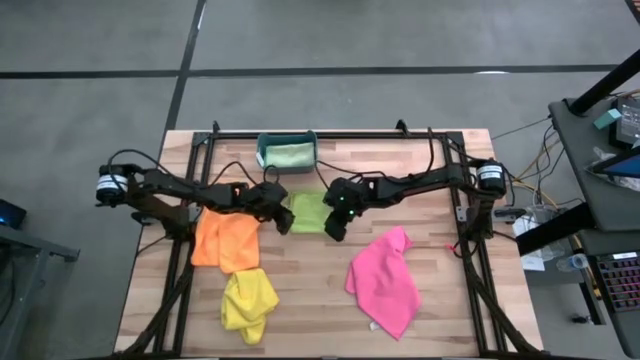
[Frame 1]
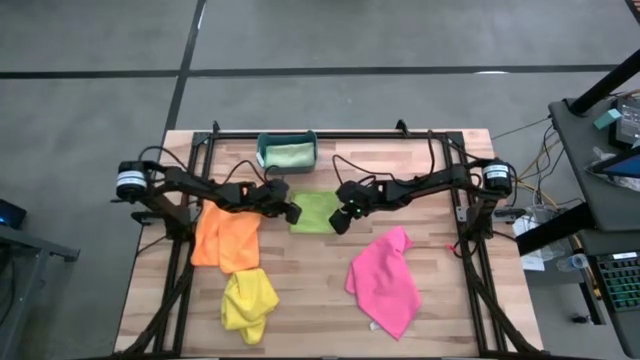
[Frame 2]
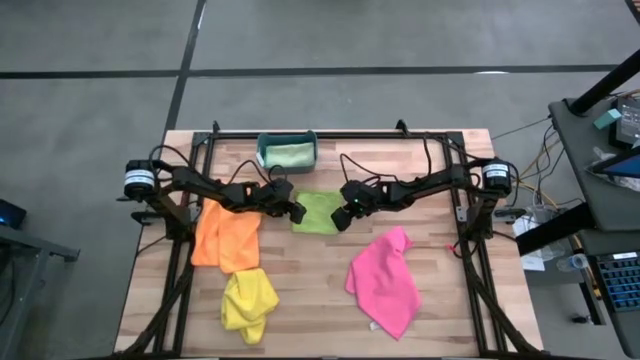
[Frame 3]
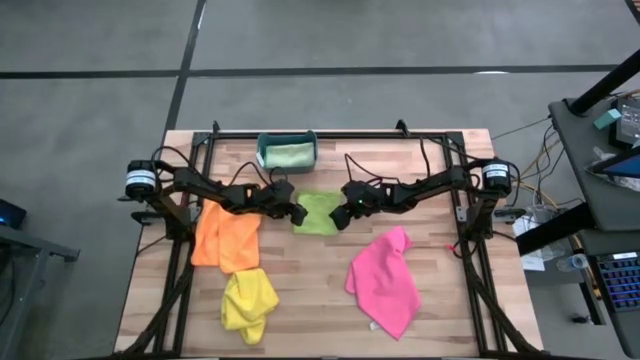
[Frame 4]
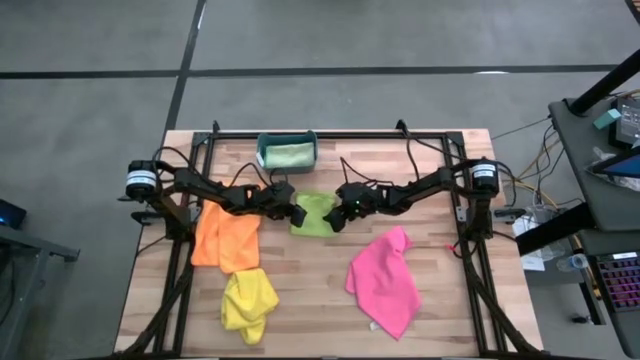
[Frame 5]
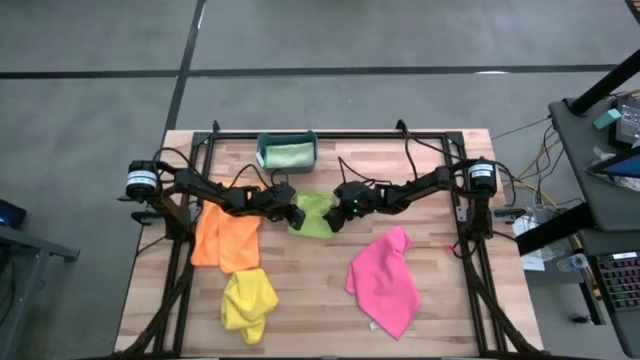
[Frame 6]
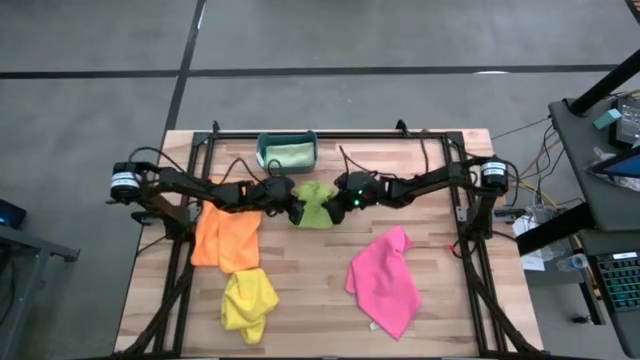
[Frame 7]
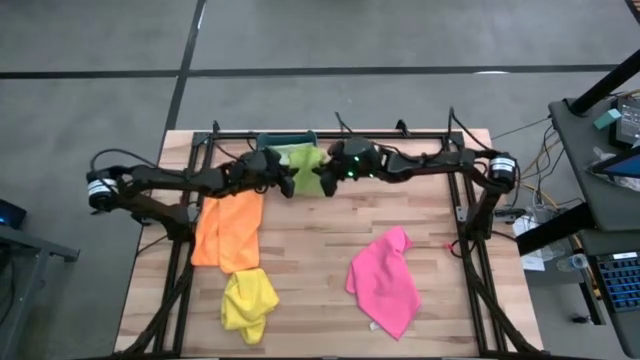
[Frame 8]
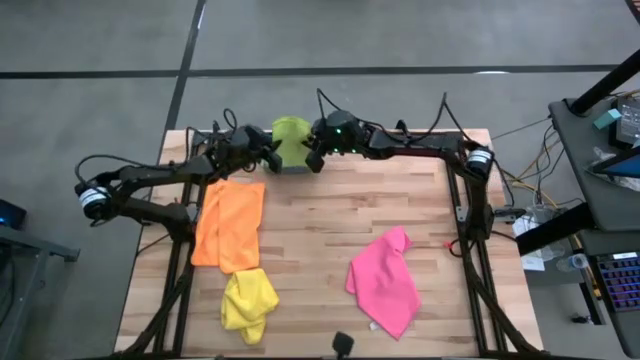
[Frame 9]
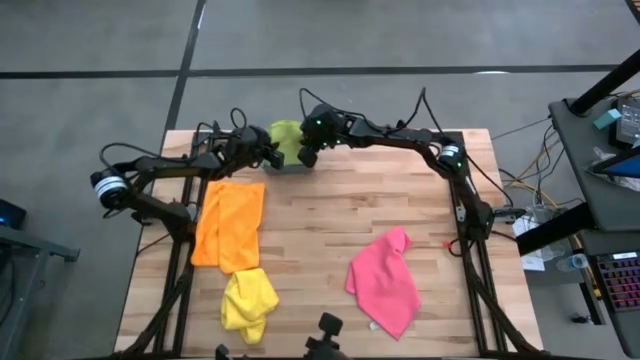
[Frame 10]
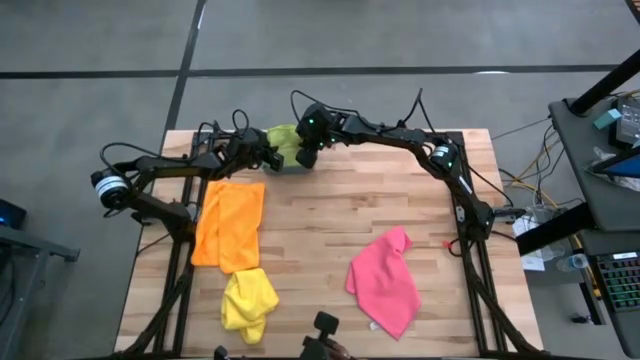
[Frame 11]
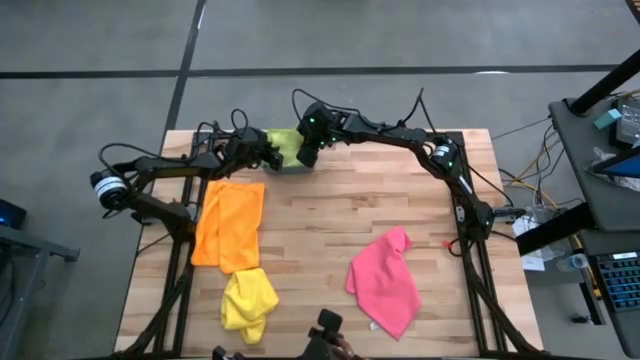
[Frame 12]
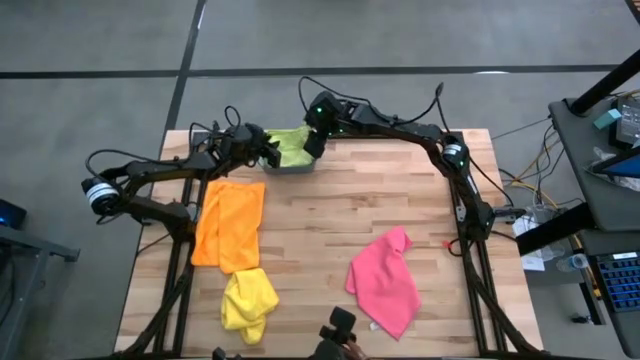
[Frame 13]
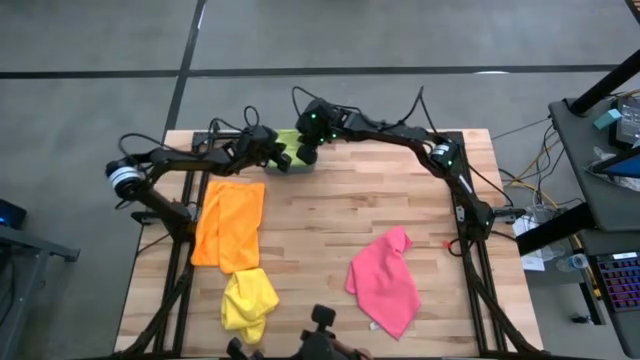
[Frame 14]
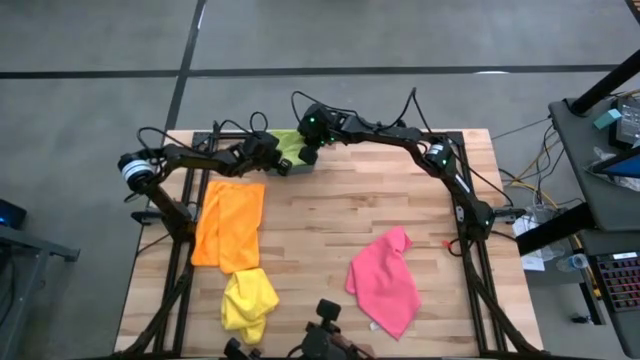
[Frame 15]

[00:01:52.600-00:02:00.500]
Task: Fold microfiber towels
Put the green towel into the bin

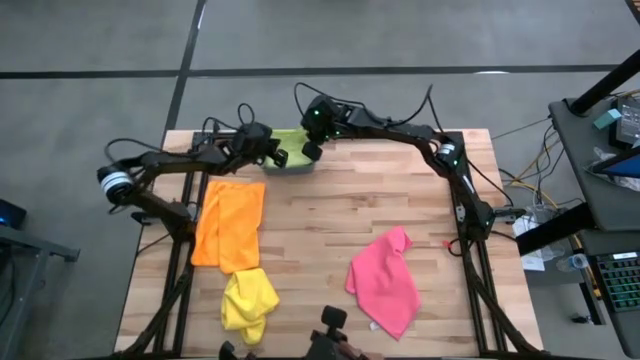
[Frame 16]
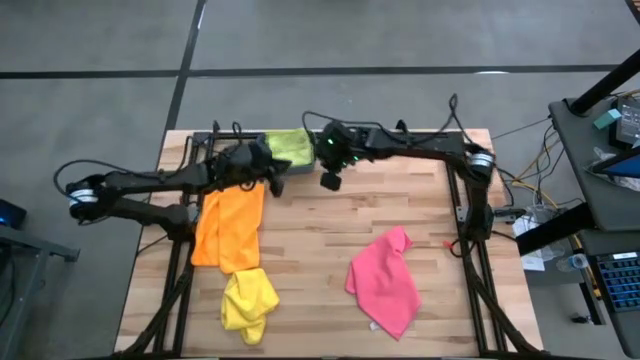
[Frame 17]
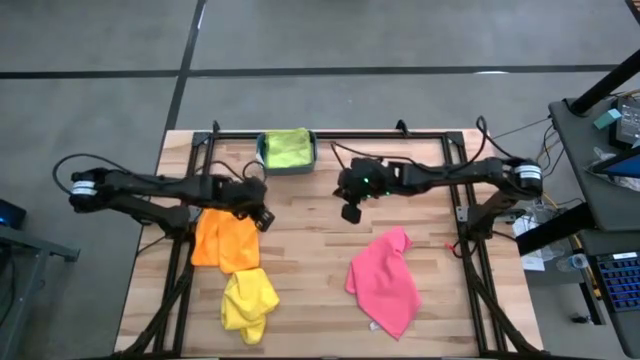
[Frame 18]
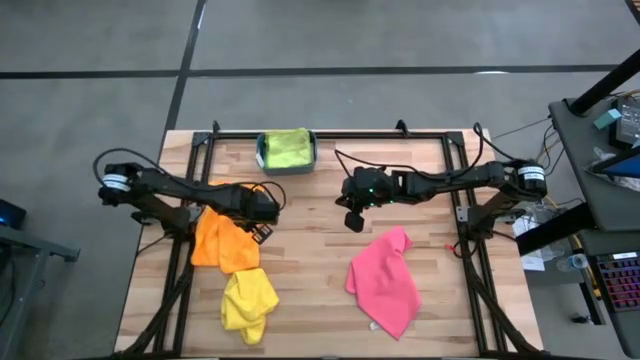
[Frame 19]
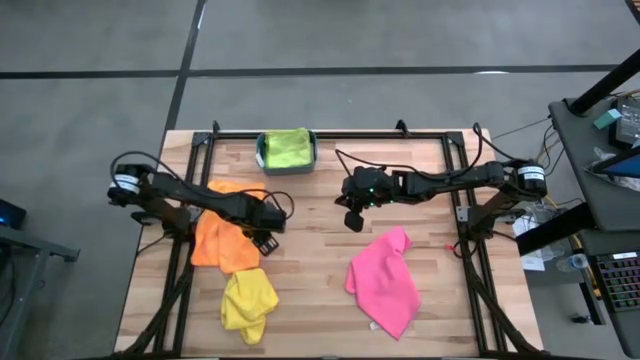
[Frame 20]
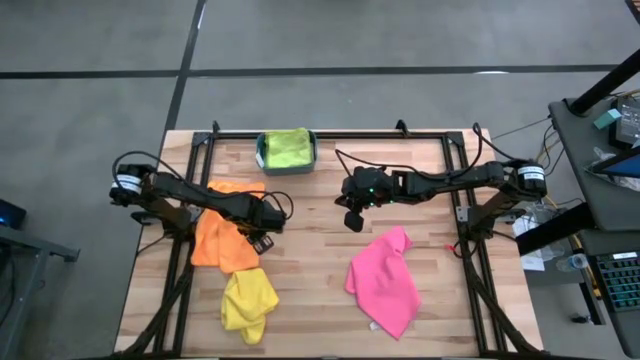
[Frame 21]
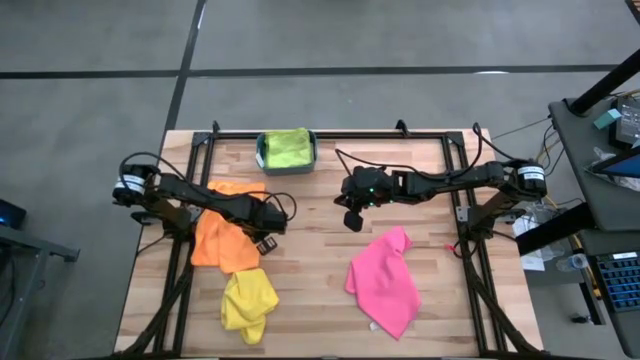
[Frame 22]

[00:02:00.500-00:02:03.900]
Fold the orange towel

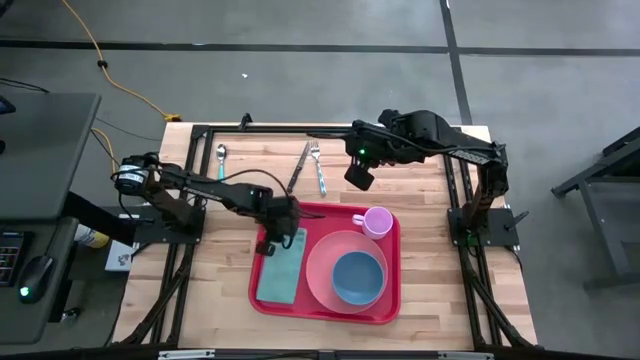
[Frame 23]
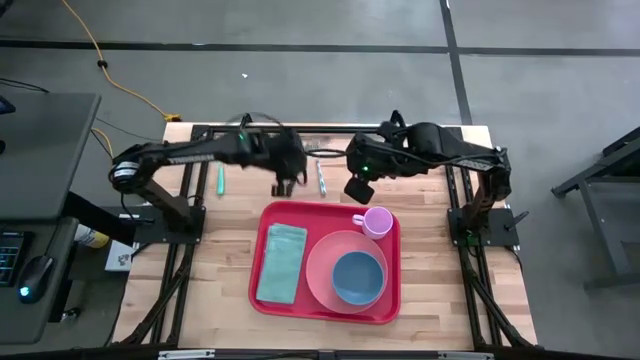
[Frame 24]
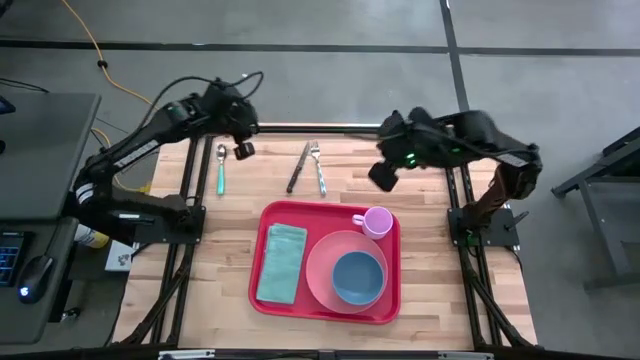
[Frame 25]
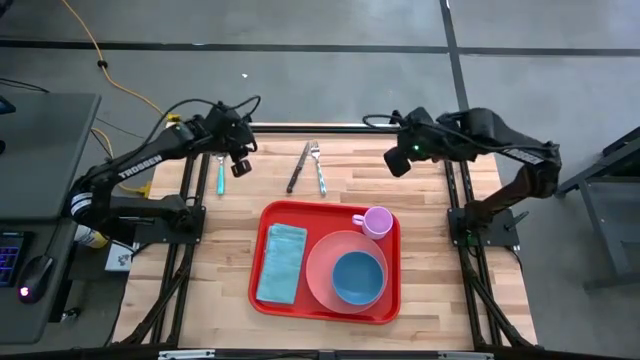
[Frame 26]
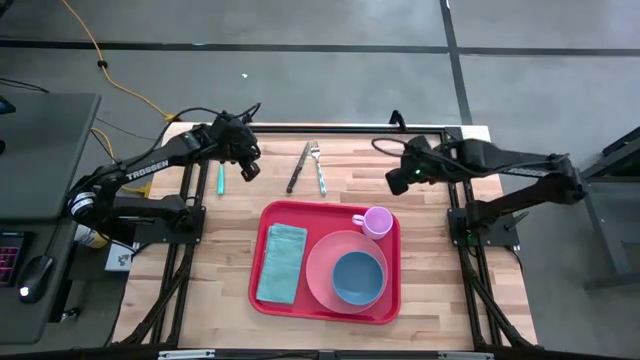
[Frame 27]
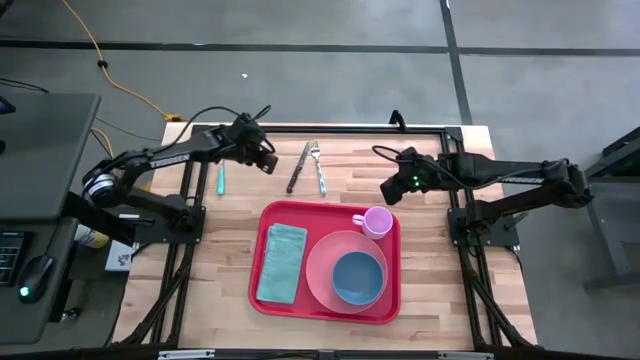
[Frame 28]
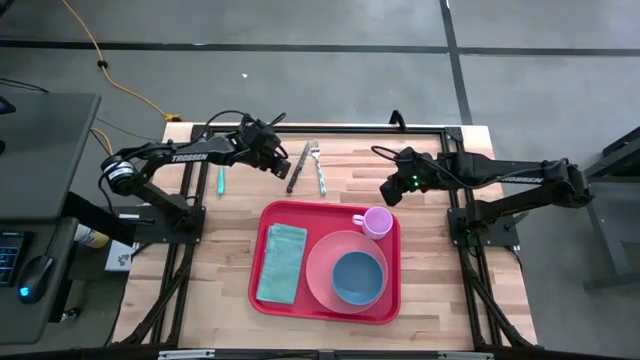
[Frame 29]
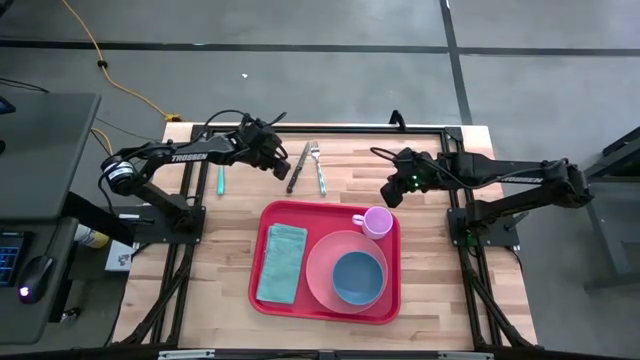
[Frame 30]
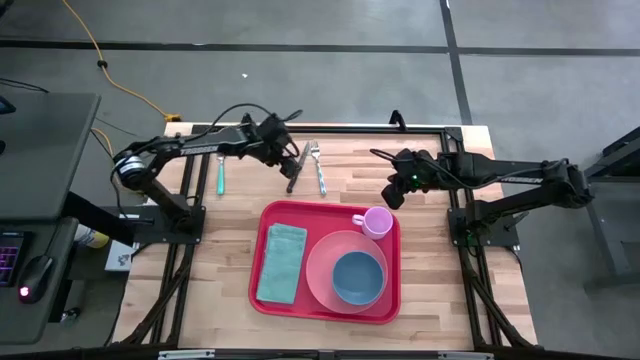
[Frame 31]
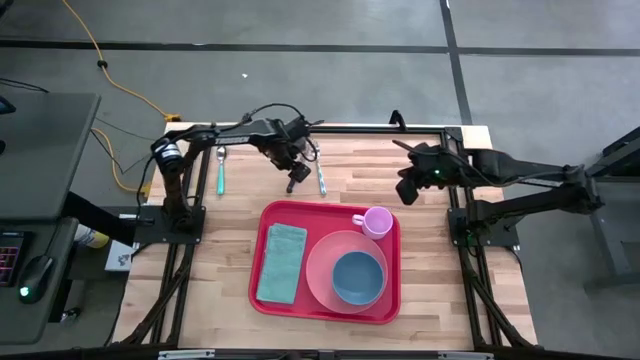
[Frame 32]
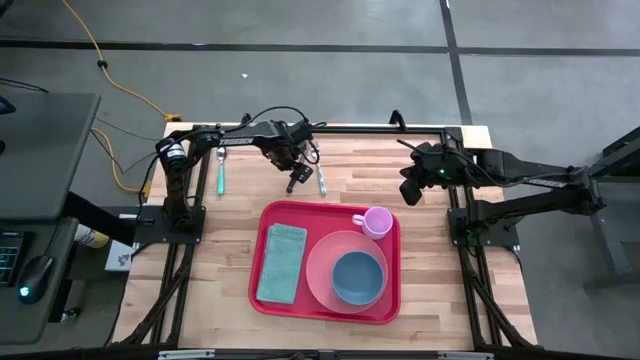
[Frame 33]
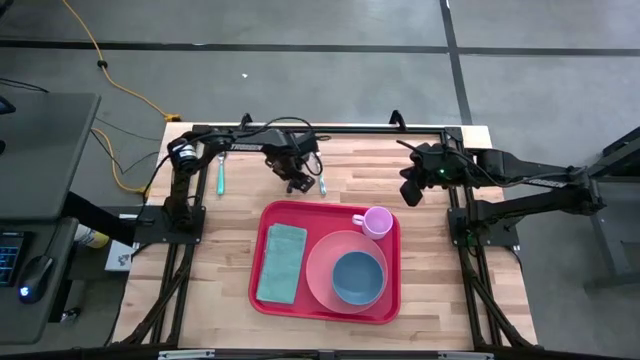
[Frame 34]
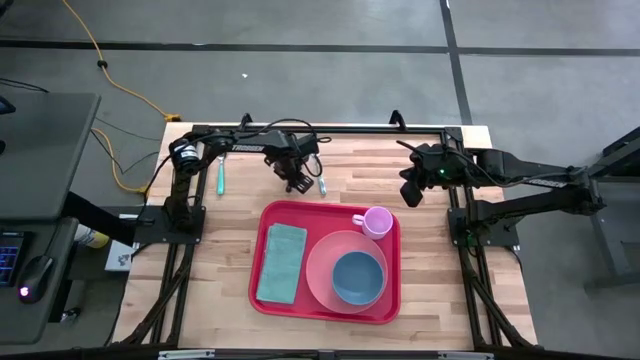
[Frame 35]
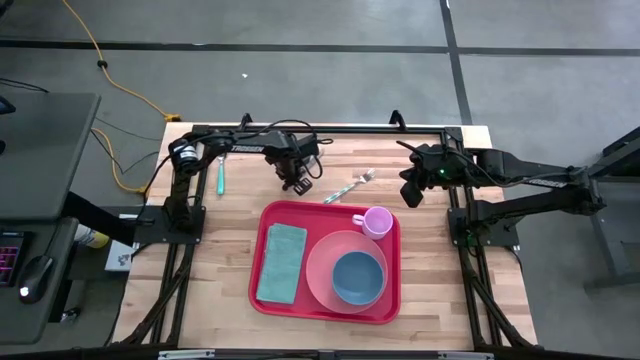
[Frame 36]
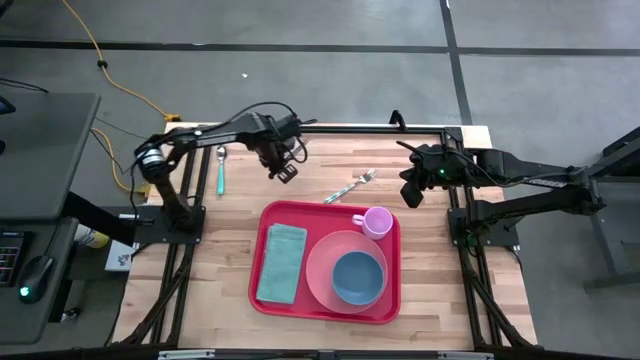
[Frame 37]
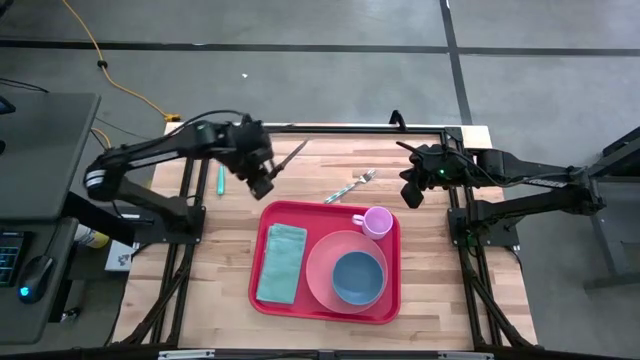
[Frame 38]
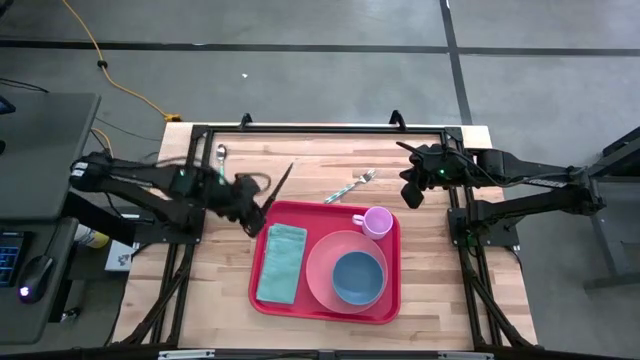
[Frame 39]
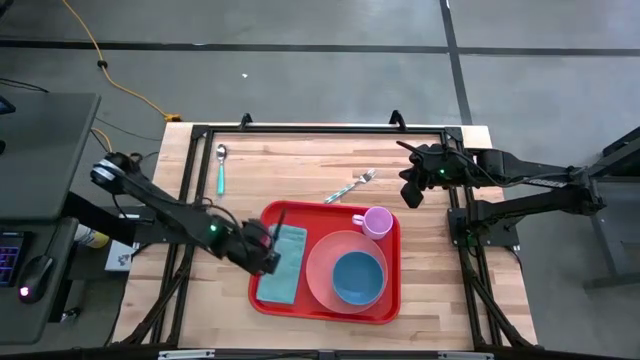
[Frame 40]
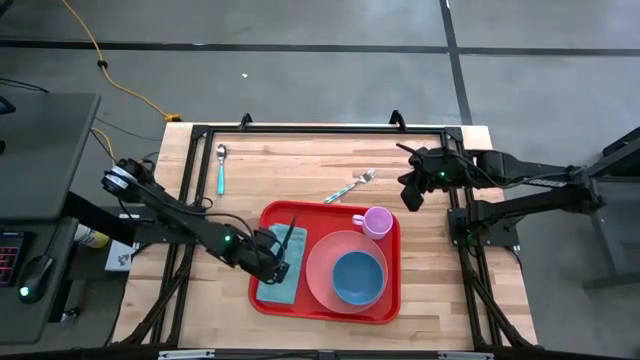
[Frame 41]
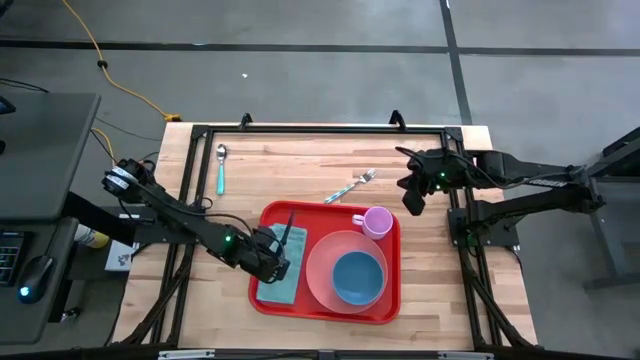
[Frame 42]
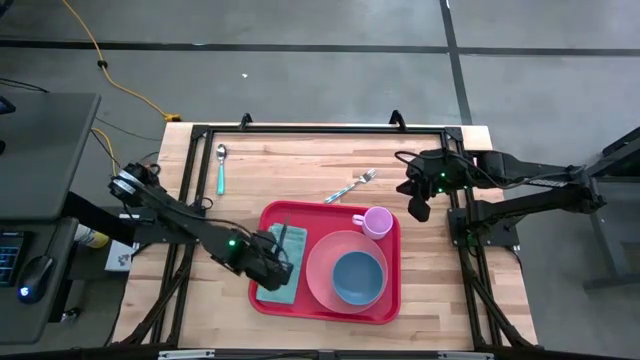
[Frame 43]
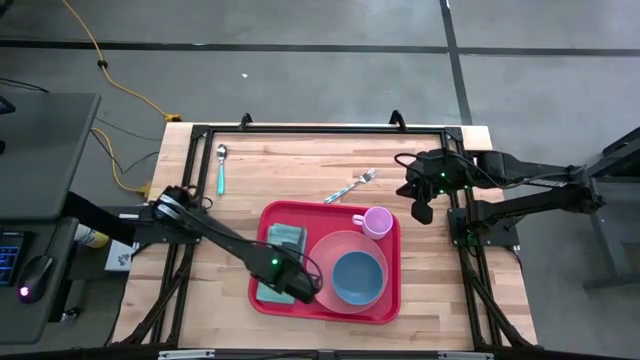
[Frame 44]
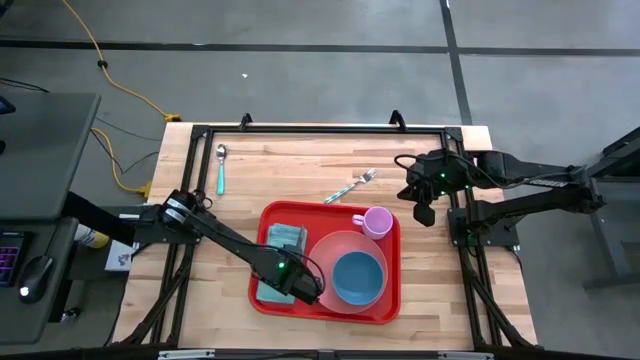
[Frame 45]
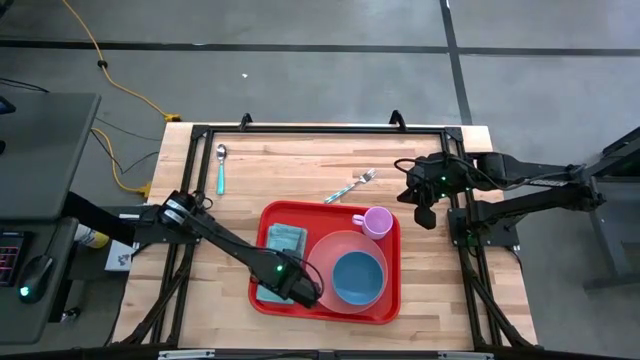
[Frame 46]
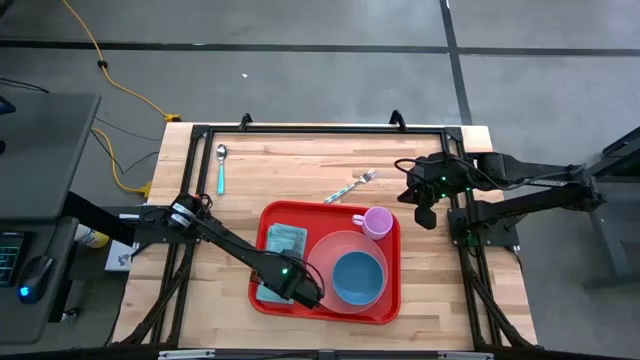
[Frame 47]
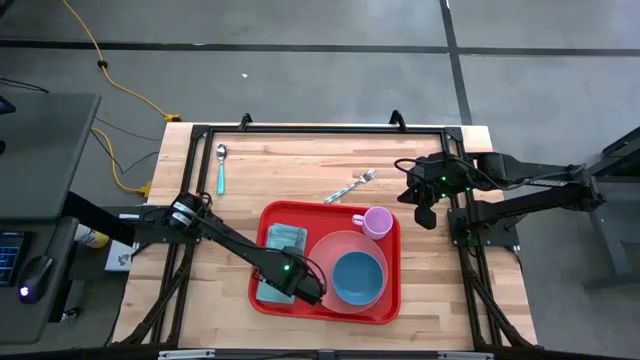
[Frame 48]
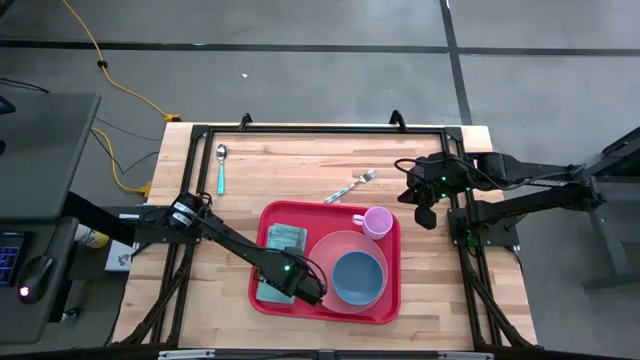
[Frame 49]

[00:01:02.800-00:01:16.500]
Task: Set up tray
Put the black knife on top of the blue napkin on the red tray
